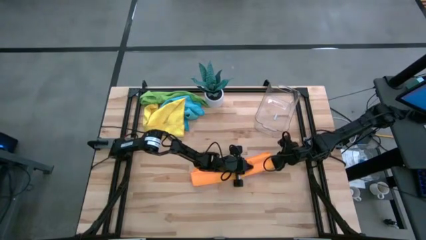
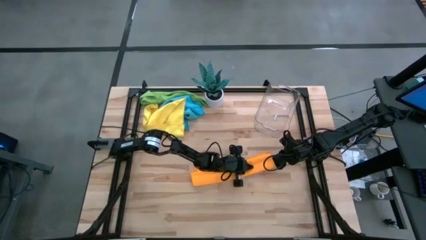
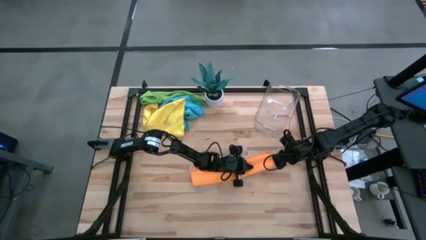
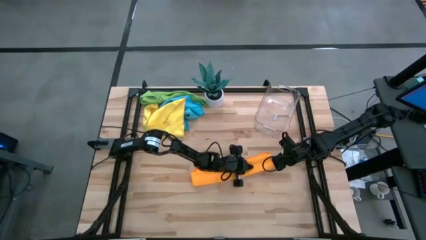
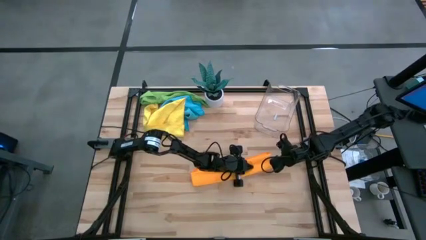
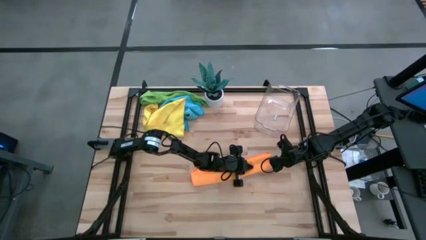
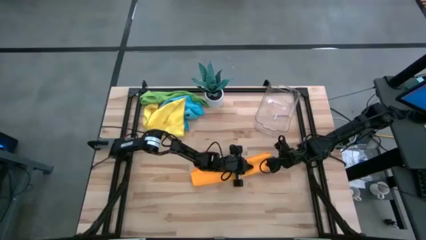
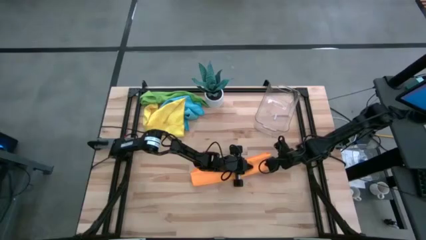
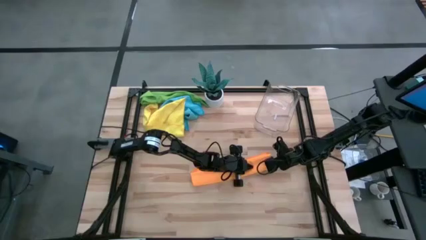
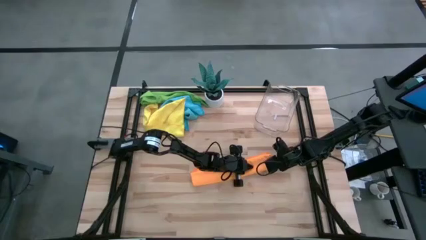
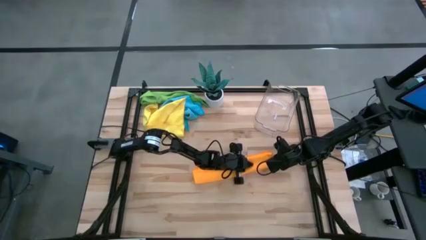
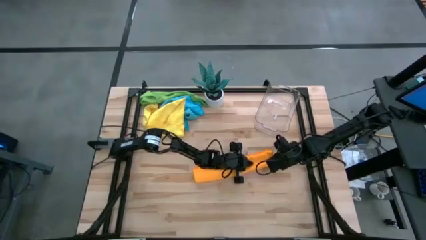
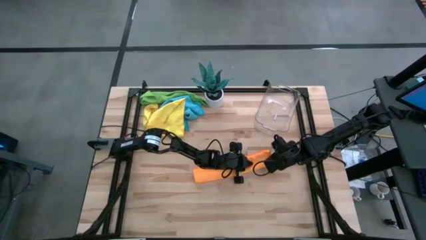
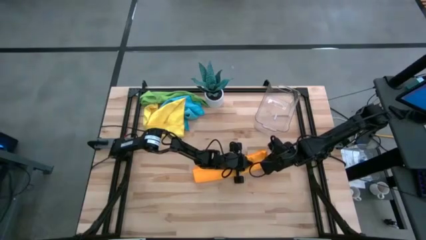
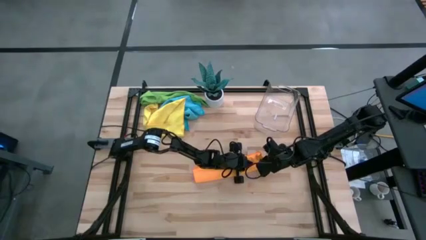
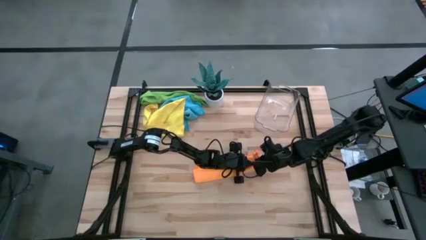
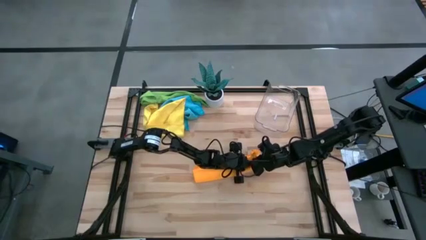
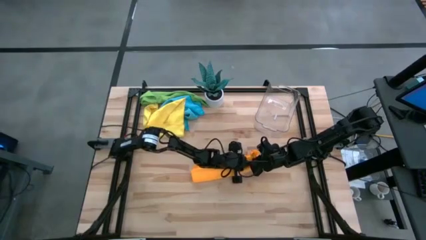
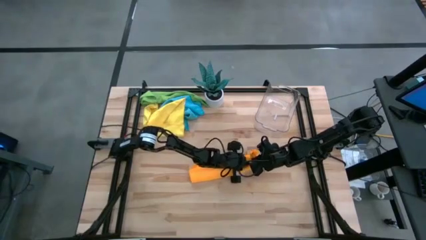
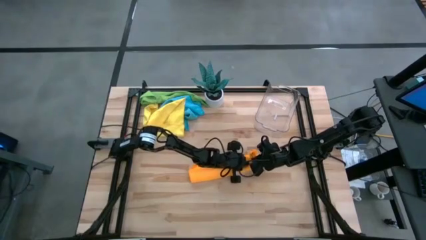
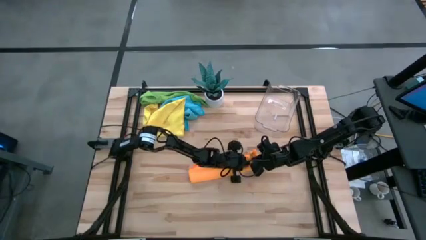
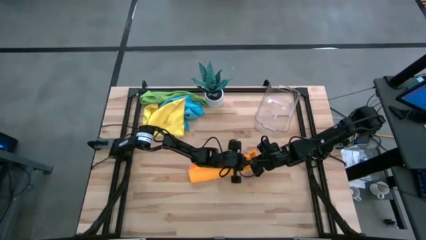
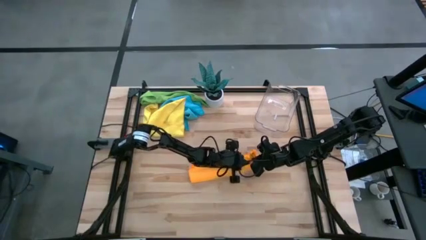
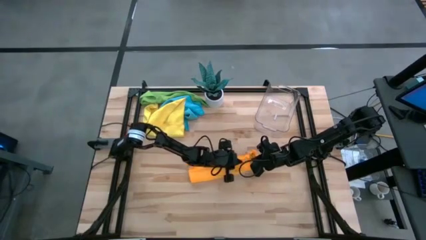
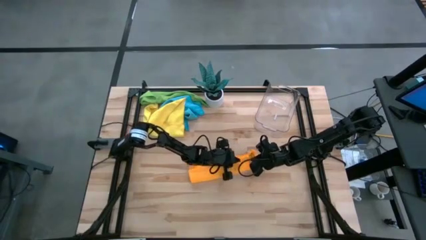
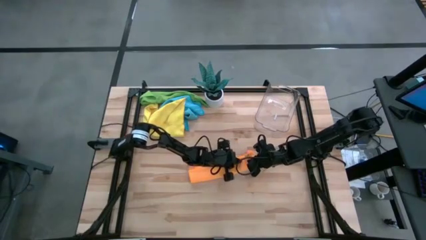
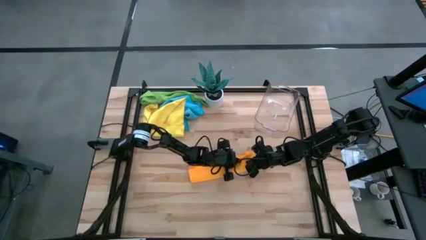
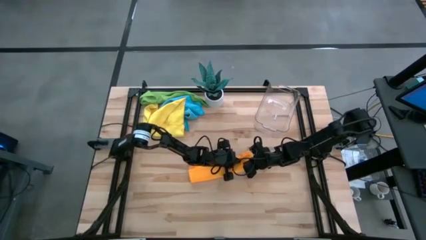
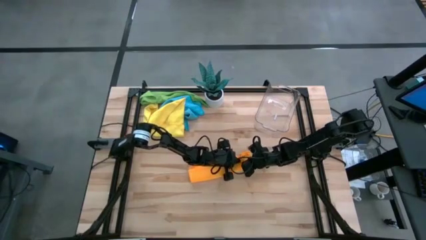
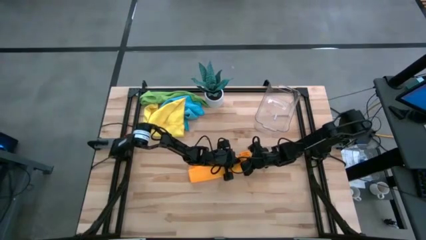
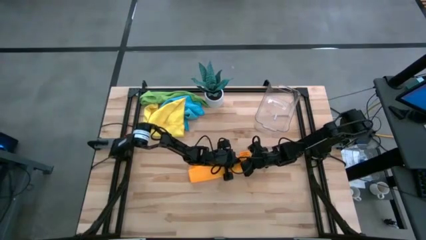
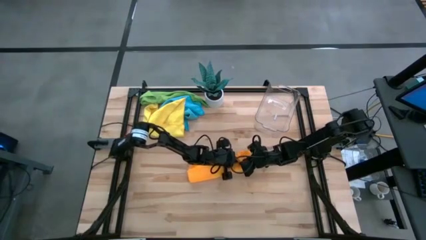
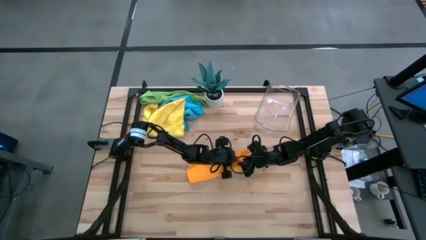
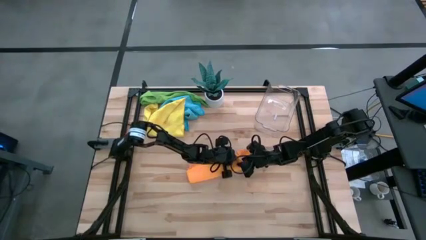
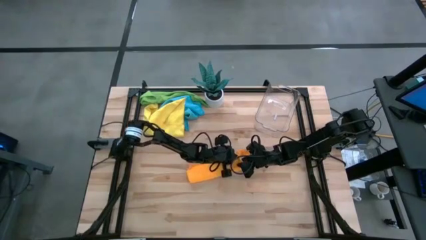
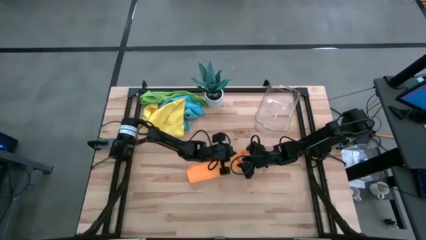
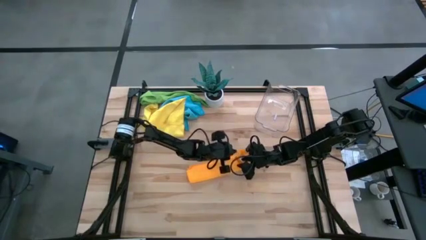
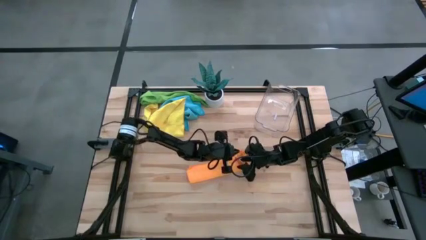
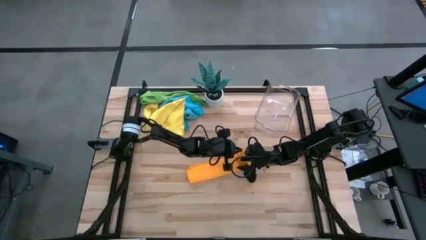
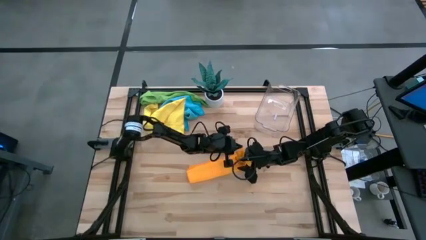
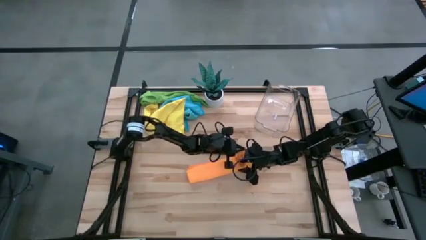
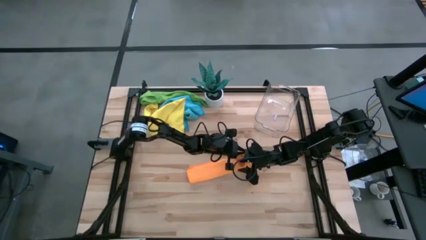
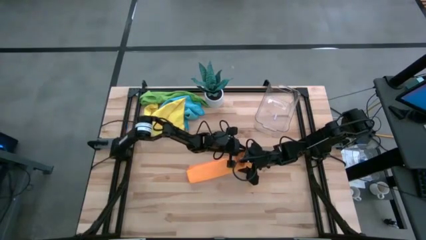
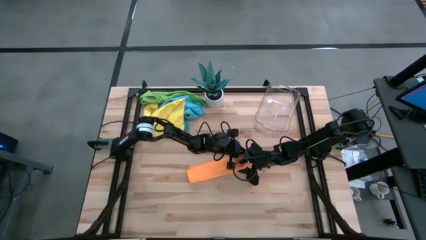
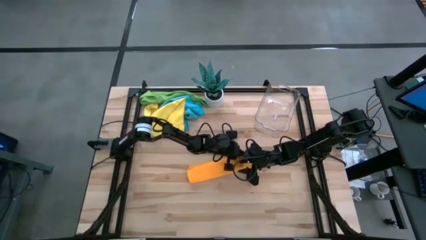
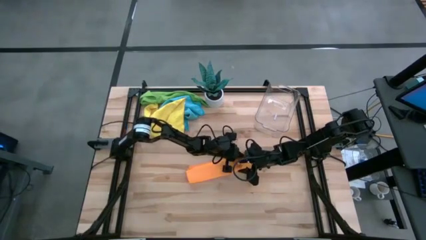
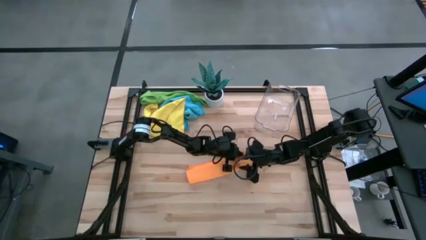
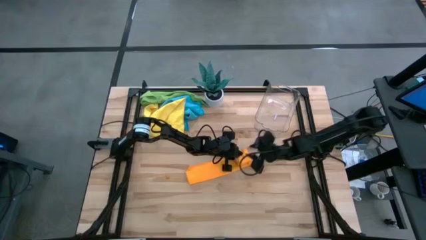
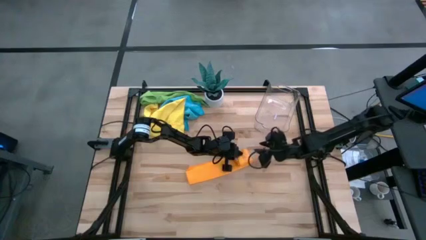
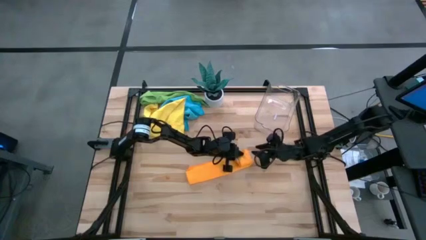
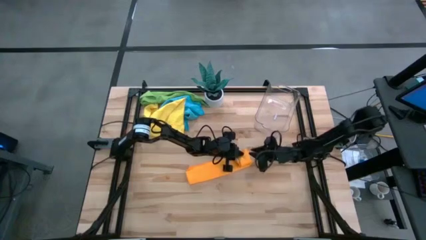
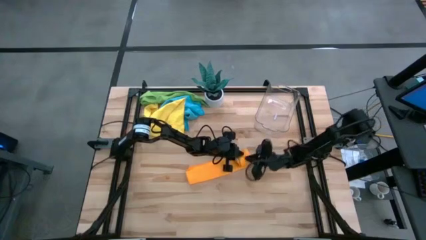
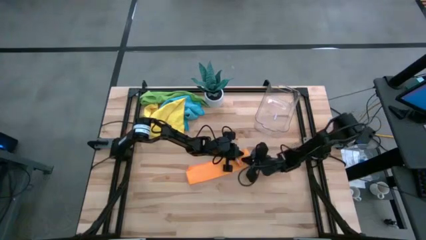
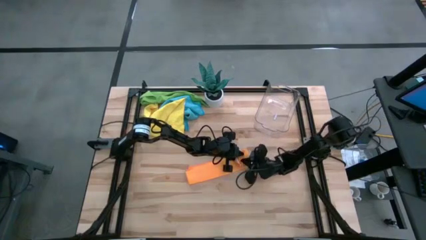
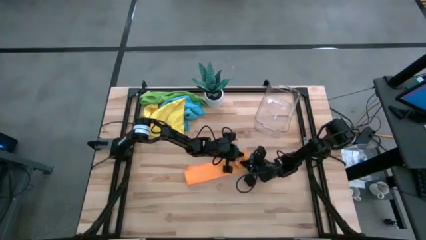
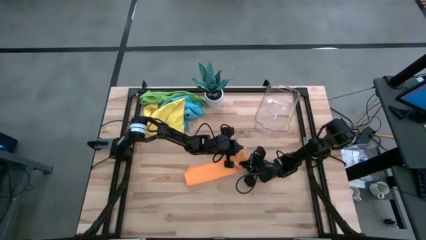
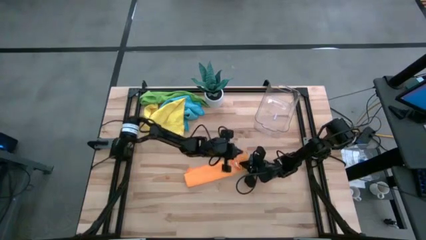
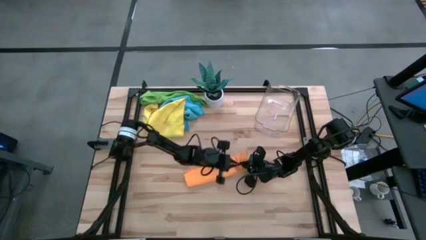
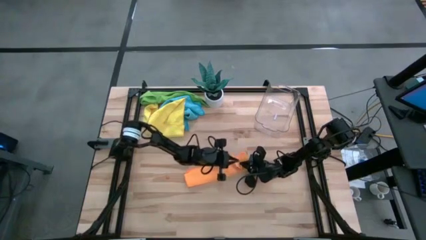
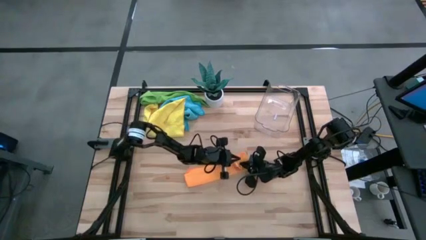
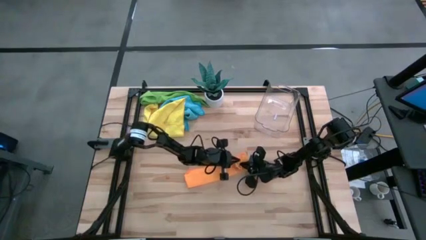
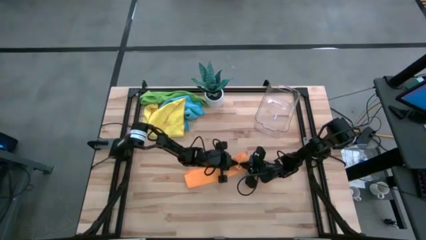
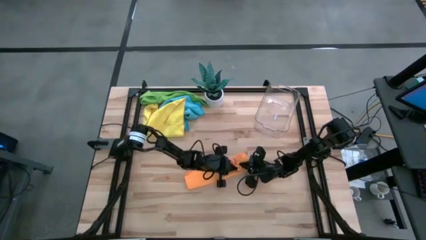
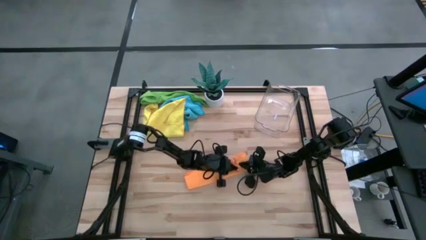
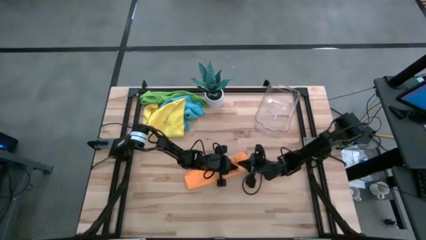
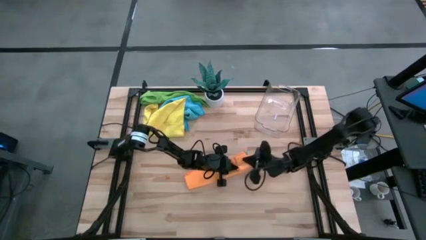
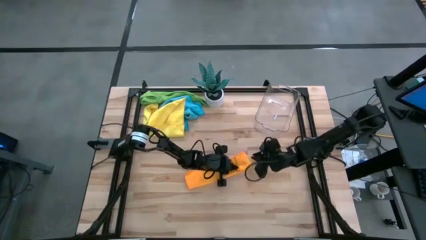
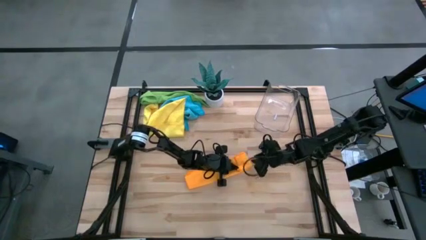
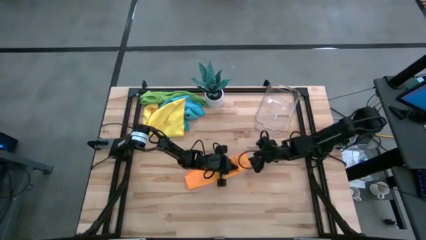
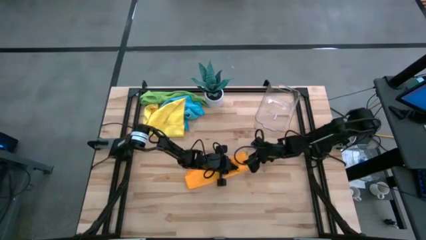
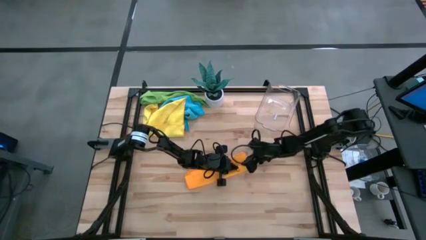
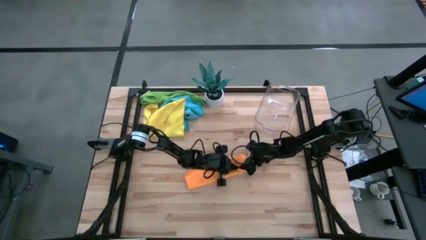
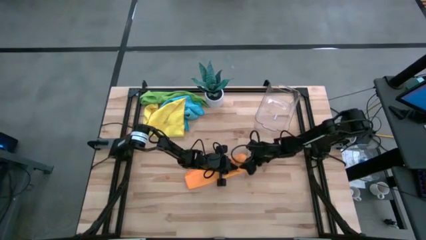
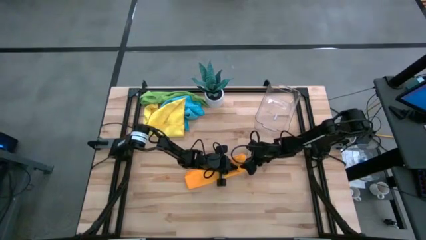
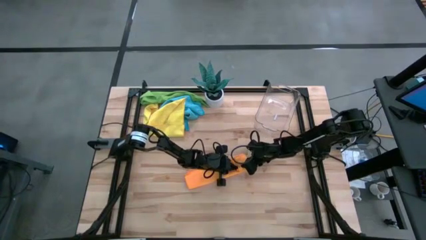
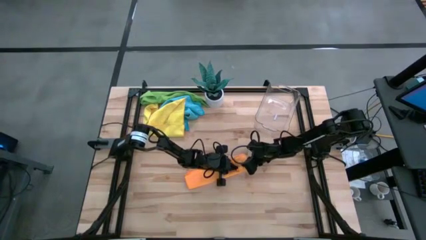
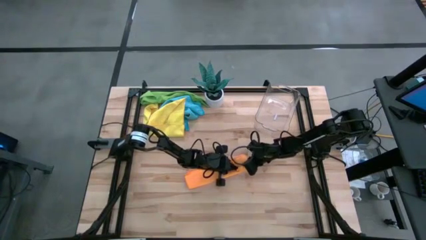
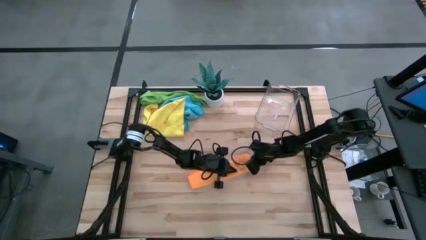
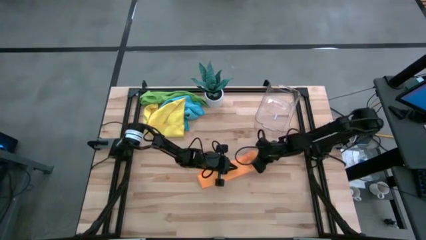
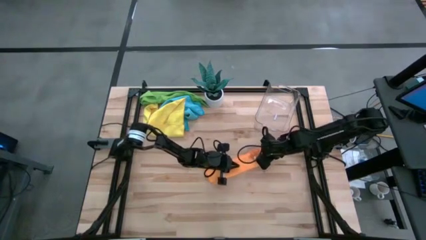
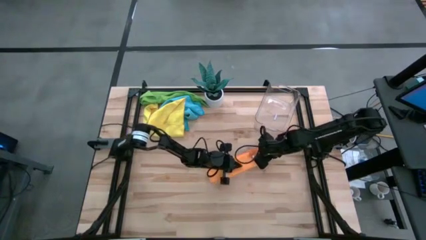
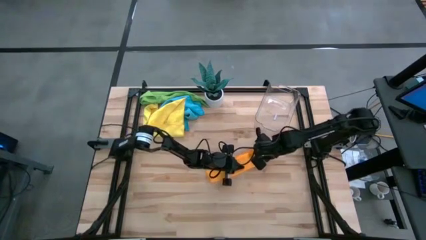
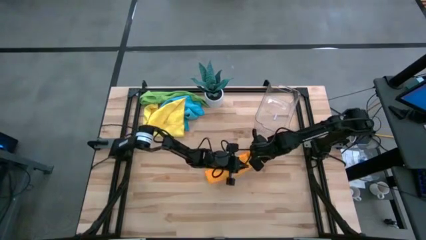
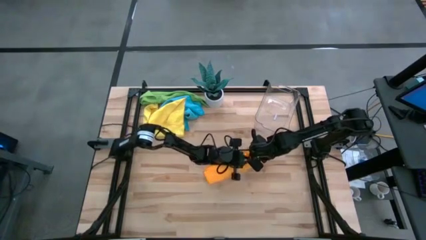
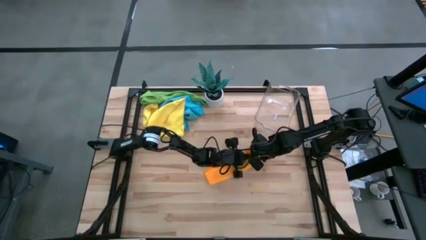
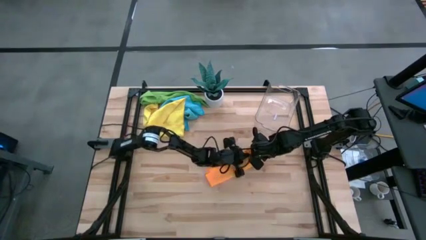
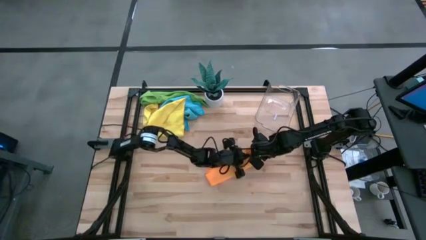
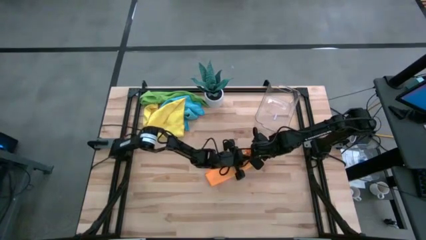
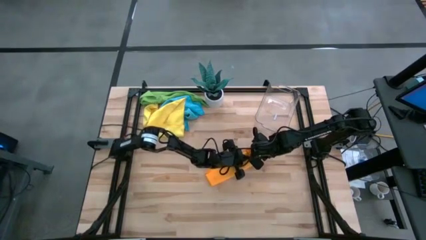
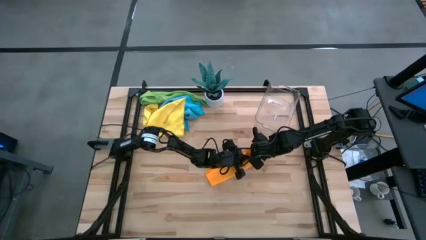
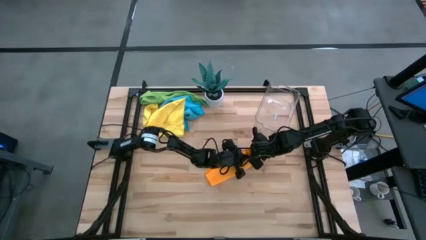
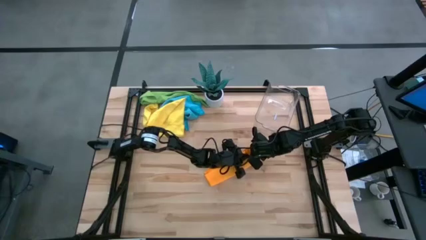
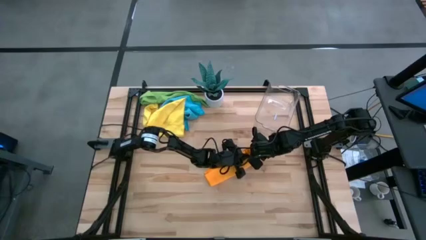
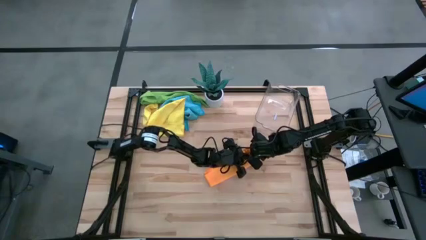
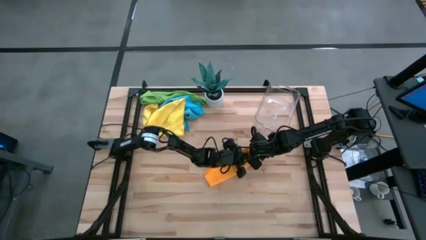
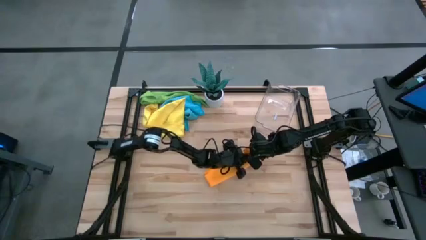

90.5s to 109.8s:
Task: Roll microfiber towels into tight, uniform cylinder then place into a basket
Roll the orange microfiber cloth
